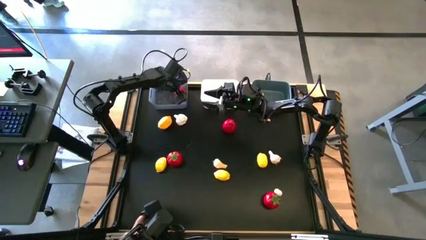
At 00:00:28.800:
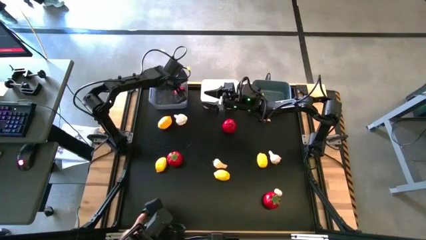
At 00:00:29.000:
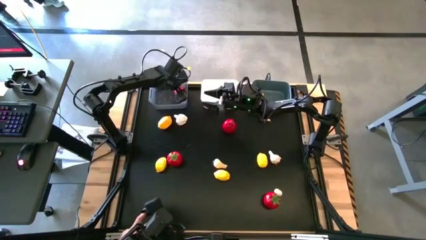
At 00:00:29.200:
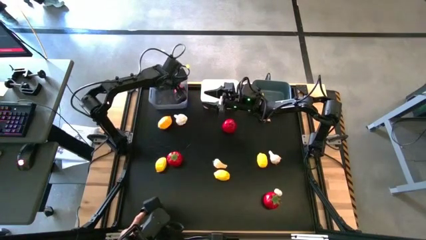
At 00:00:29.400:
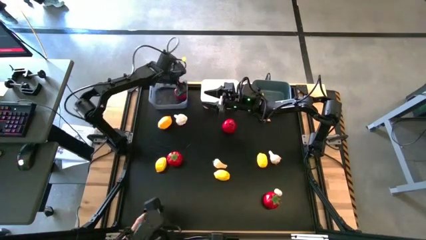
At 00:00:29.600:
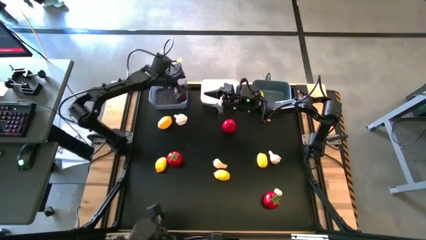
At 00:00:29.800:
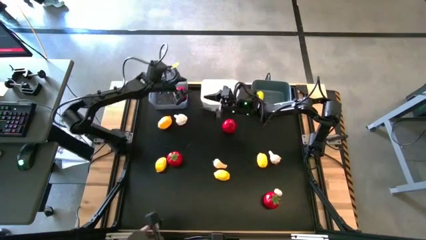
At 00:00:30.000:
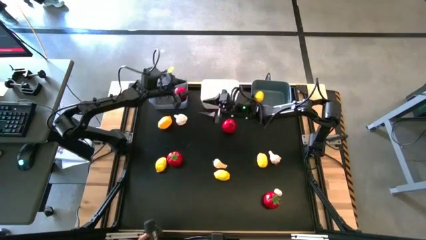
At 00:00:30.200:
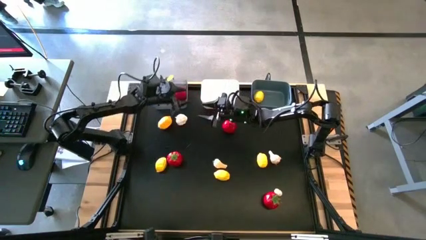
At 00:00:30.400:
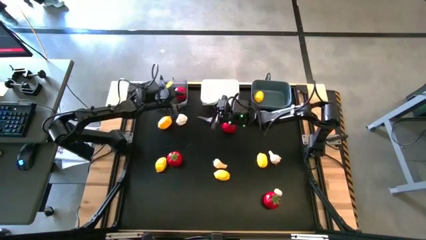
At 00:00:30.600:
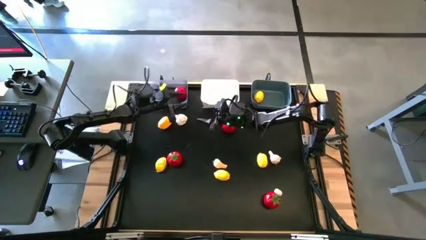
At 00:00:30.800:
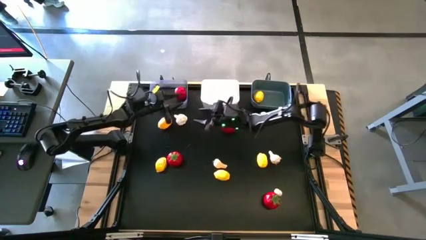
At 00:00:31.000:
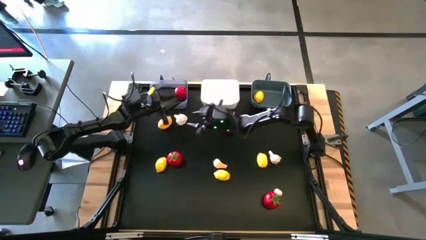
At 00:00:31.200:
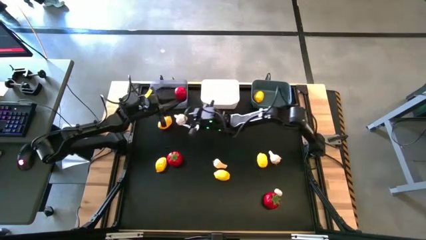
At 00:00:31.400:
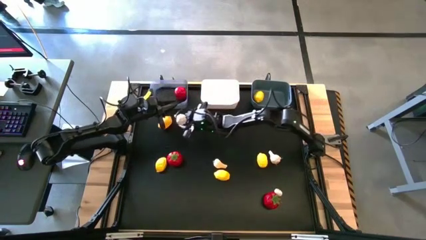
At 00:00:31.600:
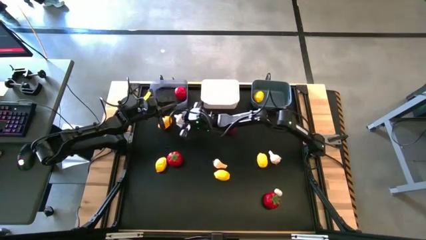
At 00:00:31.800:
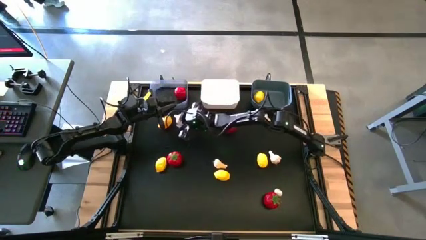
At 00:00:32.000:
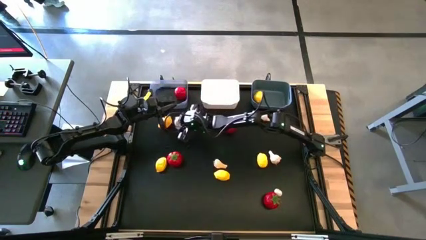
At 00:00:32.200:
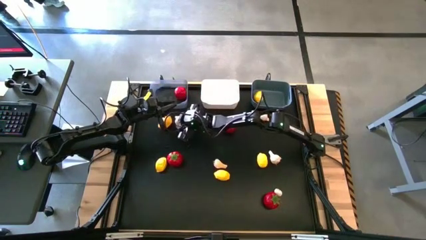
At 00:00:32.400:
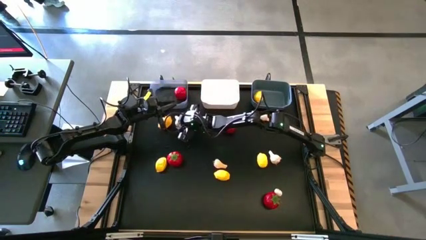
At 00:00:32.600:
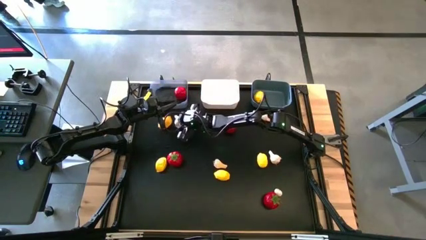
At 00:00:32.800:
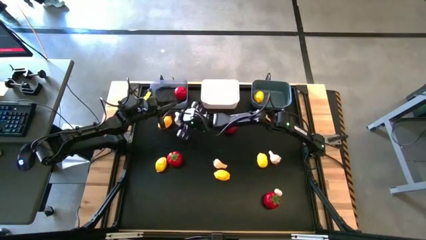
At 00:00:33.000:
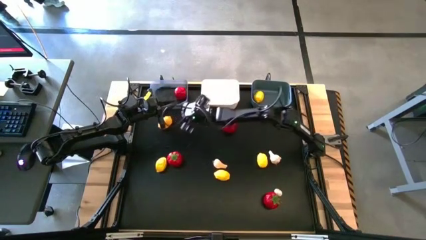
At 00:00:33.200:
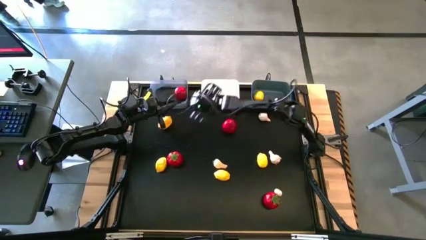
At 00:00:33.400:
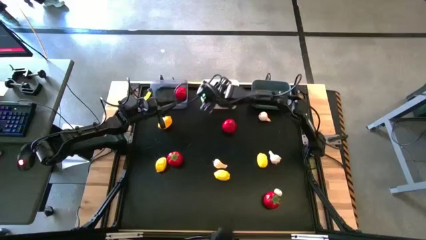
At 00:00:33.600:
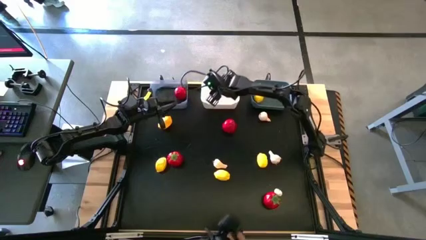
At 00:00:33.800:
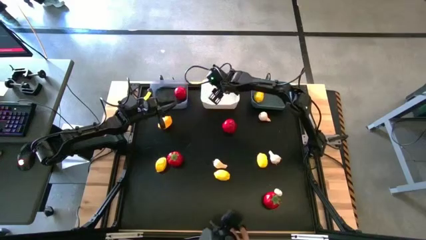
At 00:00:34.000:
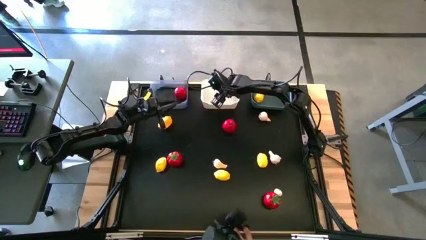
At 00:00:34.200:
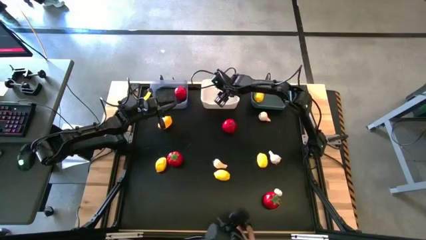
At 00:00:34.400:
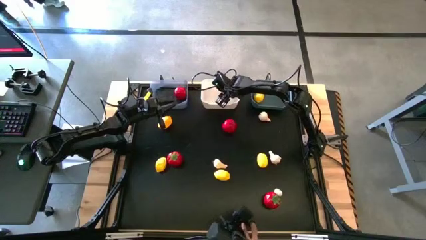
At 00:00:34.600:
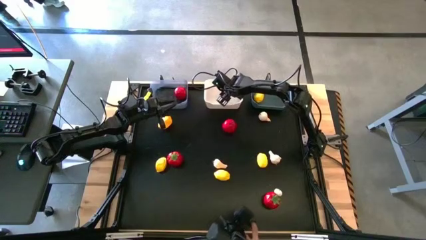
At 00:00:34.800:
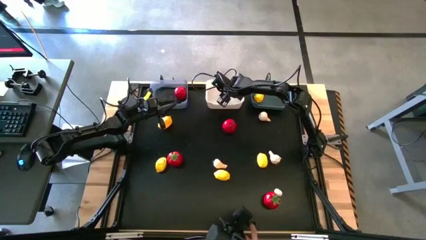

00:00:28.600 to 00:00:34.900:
Task: Sort produce into baskets
Put the garlic into the white bin

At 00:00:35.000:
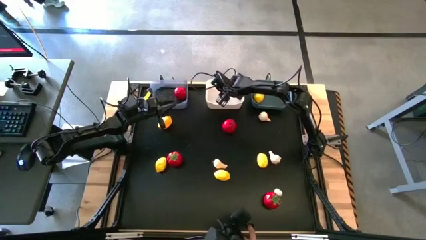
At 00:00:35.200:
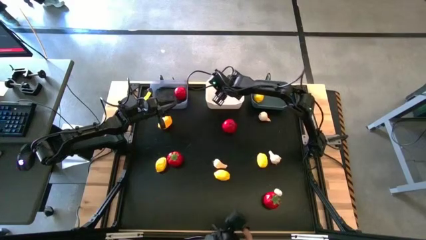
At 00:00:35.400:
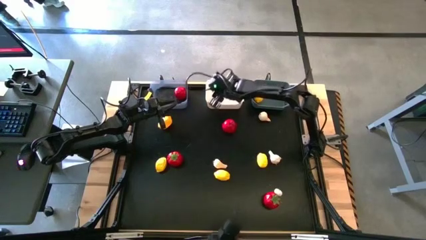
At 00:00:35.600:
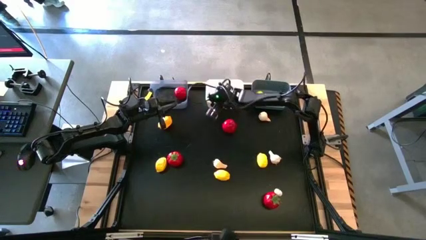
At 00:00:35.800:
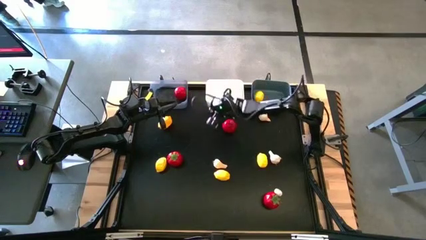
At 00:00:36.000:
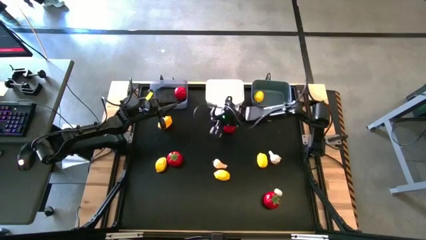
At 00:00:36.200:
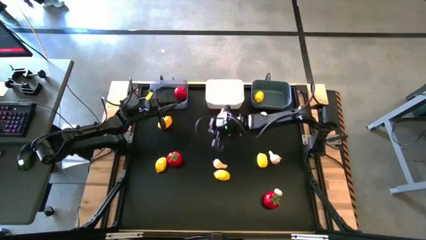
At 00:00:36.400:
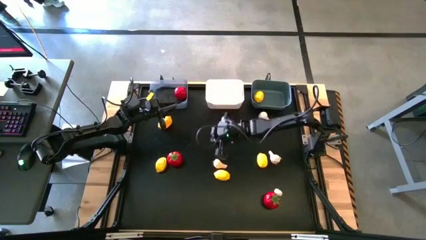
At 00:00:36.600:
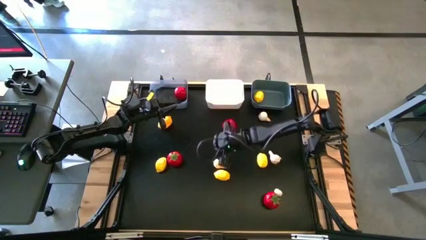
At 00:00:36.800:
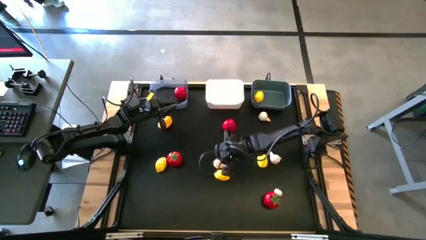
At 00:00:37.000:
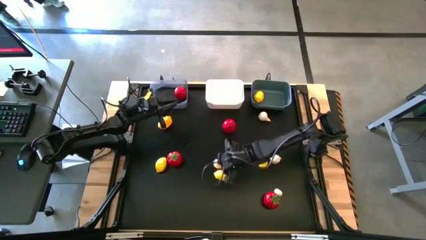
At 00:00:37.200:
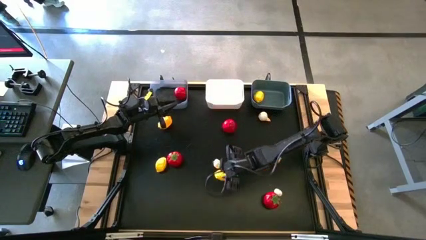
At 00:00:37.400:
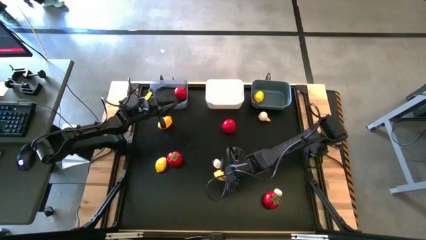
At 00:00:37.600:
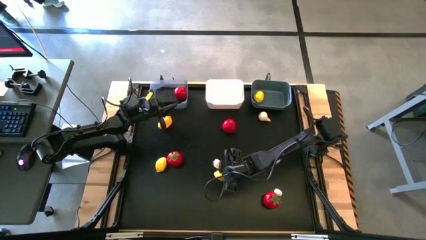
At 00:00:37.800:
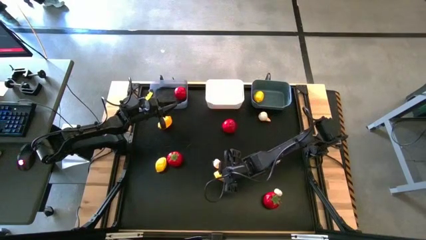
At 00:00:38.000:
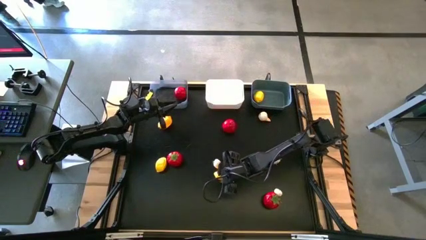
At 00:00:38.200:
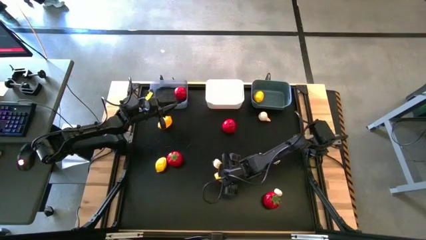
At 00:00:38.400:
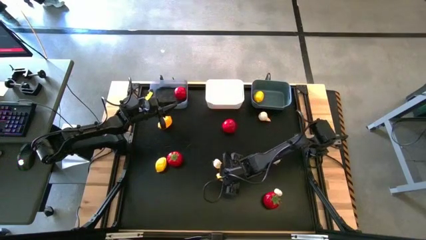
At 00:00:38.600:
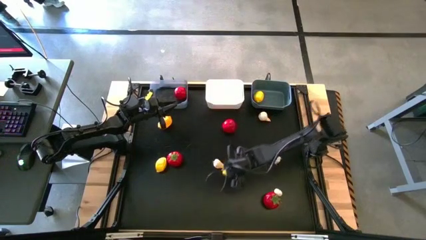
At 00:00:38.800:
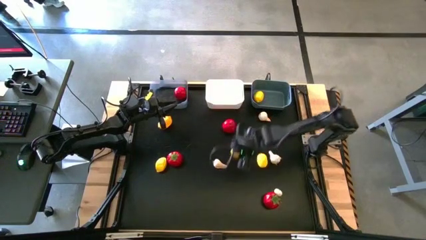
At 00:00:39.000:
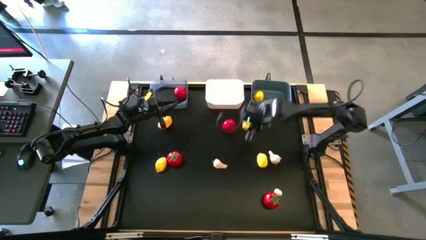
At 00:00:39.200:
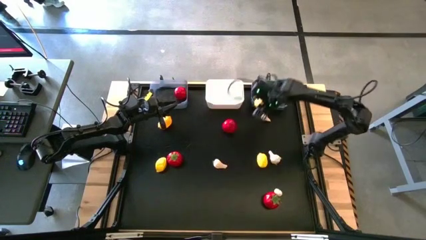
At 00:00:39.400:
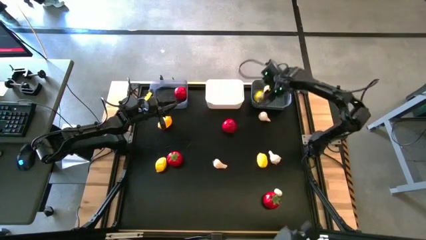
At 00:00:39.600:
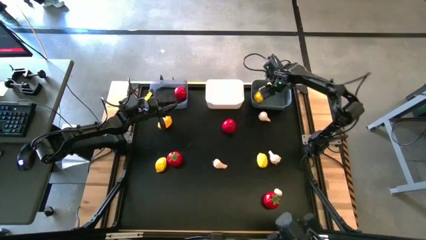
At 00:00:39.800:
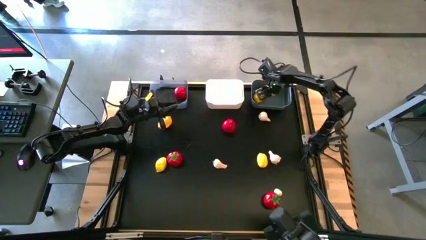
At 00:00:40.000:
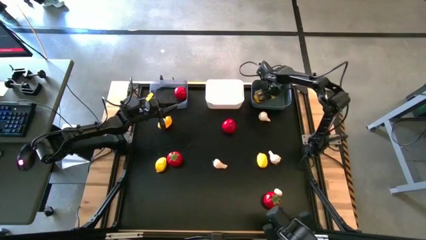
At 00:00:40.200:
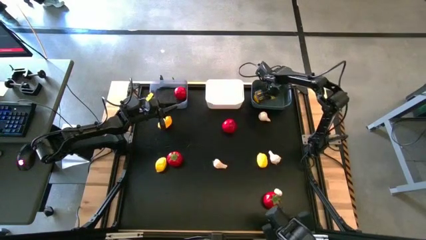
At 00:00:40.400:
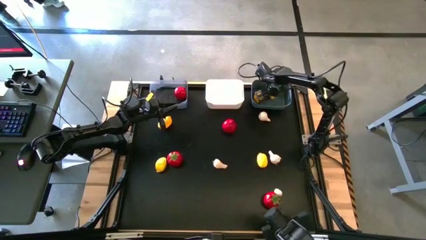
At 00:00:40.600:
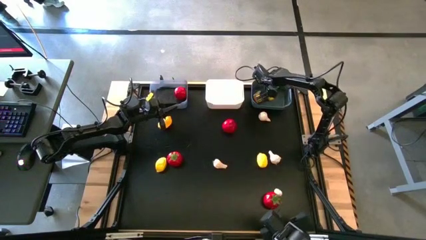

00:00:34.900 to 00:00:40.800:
Put the lemon into the blue bin

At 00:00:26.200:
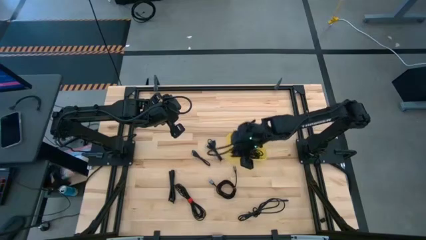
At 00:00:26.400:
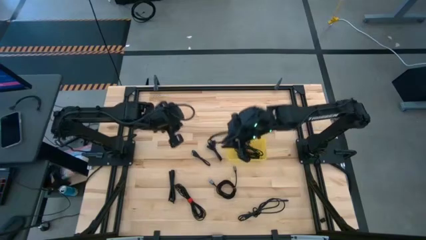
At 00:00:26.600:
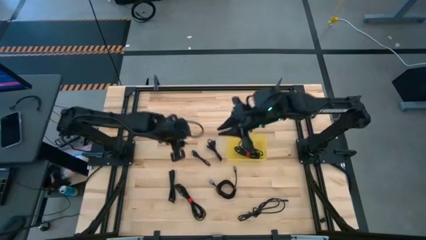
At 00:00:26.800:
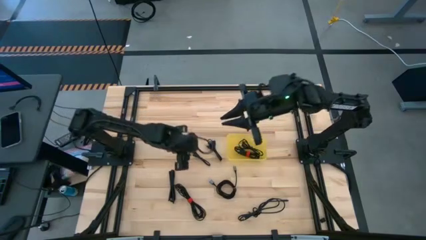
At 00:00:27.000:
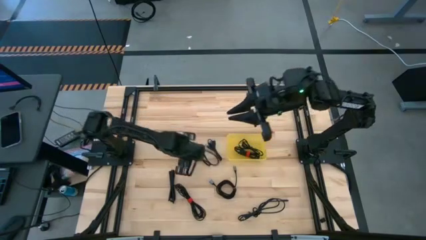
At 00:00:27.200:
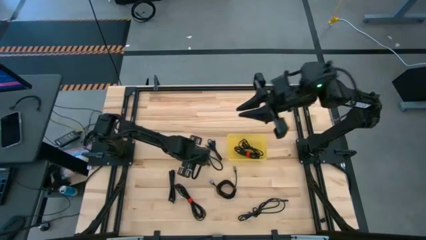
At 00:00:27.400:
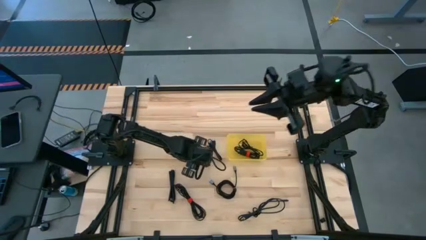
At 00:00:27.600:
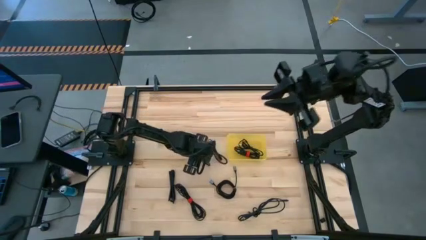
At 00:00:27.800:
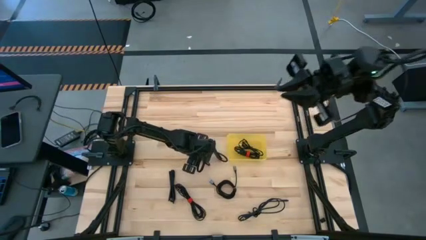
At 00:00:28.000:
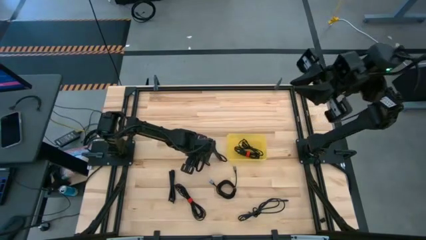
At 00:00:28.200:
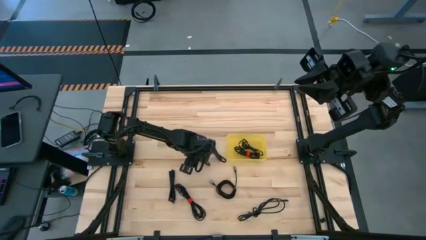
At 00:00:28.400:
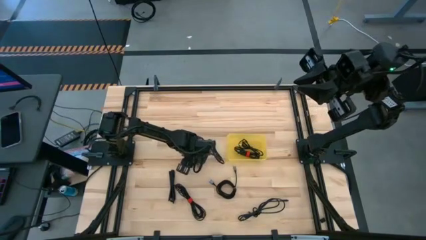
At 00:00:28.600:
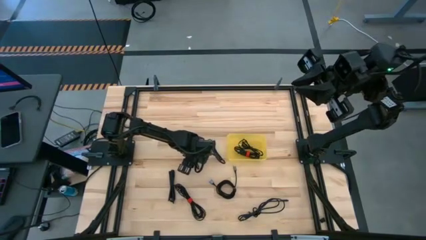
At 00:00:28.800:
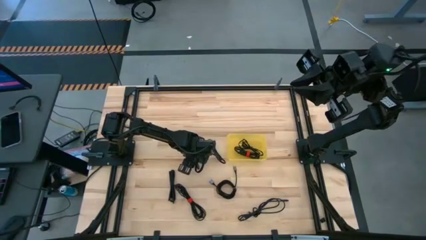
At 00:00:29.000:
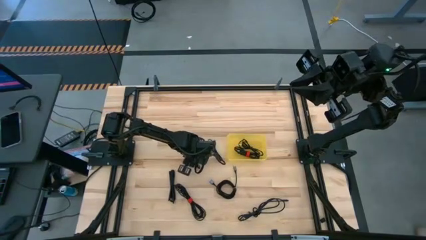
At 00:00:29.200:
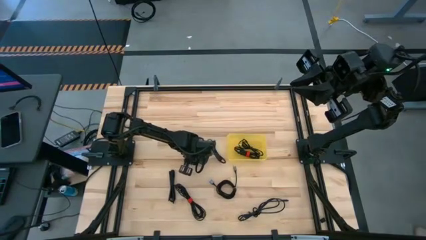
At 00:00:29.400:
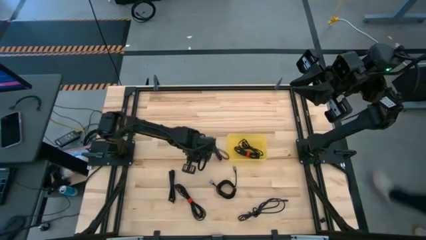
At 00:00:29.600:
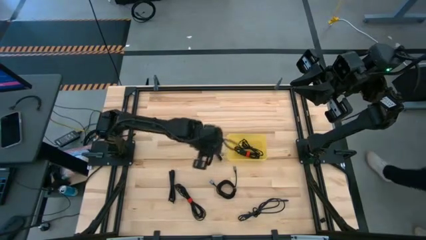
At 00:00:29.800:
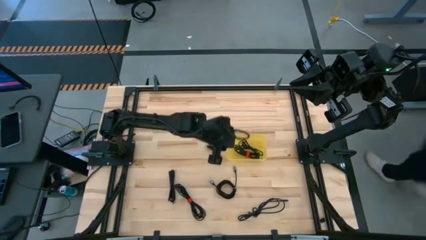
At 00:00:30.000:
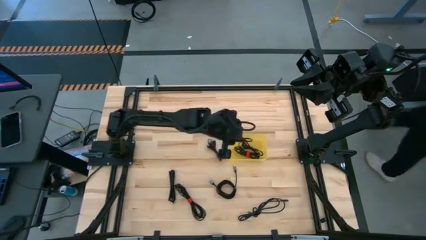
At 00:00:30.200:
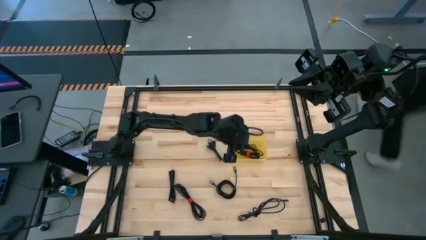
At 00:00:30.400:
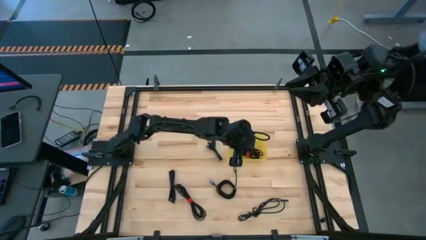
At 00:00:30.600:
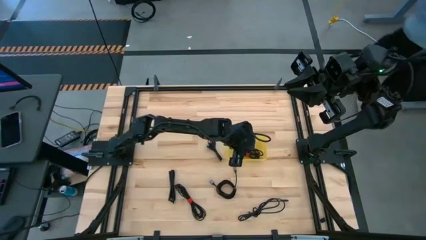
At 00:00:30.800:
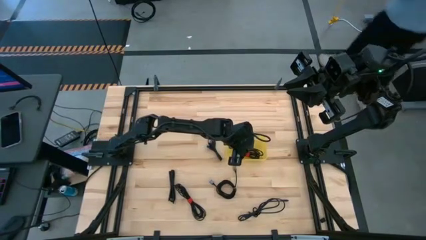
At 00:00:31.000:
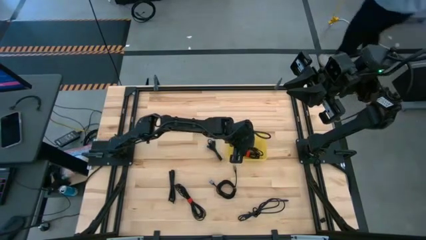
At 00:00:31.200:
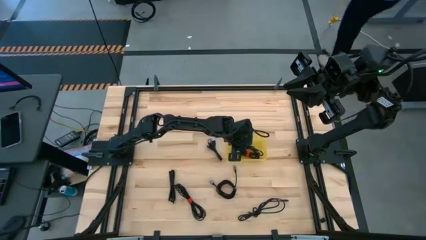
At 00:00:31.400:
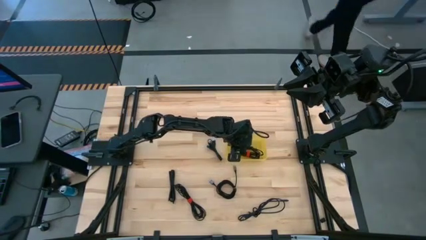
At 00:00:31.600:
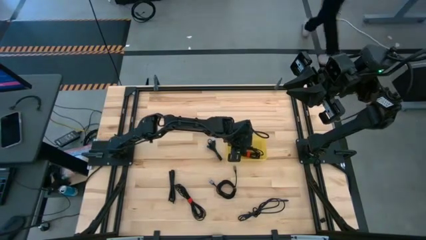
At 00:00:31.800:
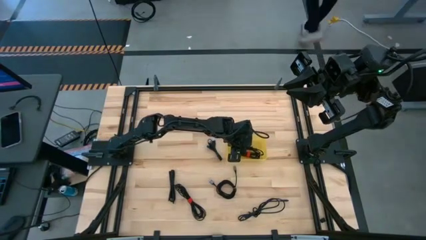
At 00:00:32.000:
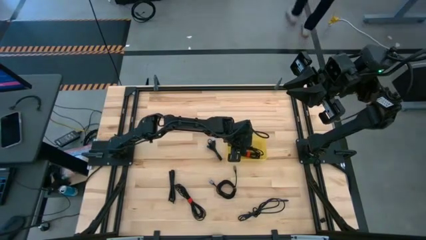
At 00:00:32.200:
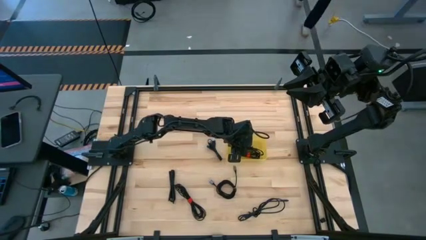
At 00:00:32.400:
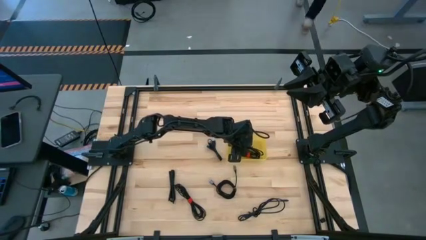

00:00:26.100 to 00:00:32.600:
Task: Pick and place USB-C Cables
Put the black charger cable into the yellow bin
